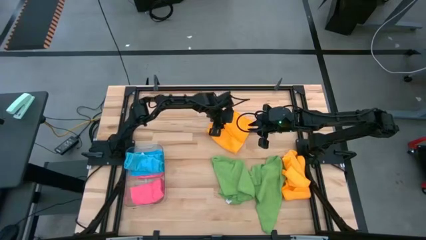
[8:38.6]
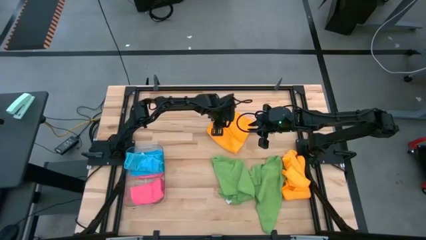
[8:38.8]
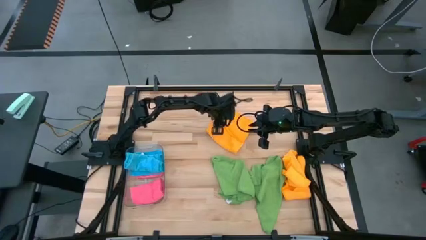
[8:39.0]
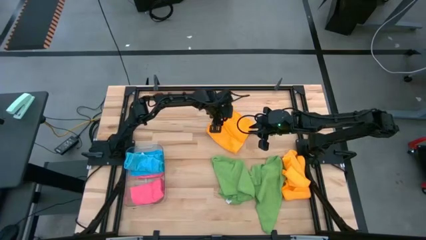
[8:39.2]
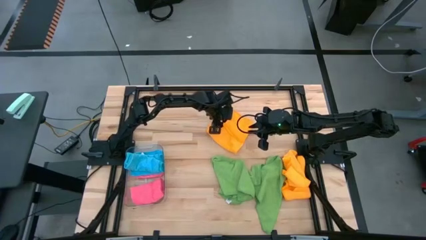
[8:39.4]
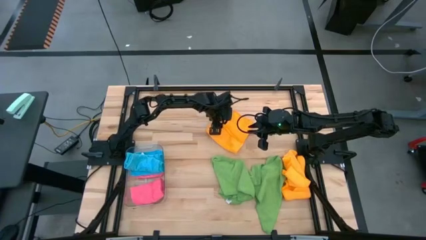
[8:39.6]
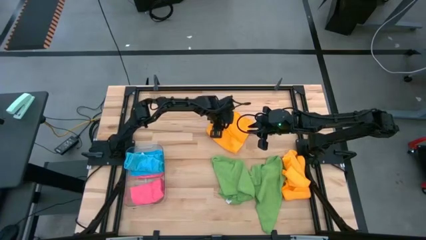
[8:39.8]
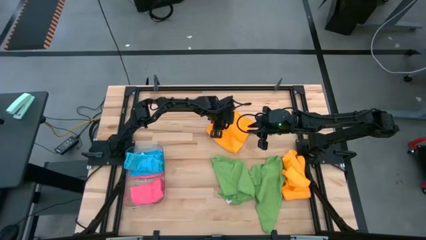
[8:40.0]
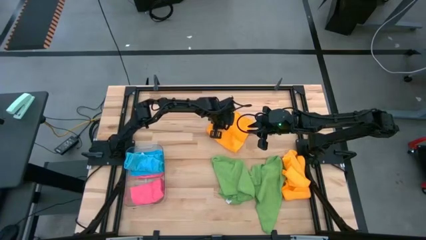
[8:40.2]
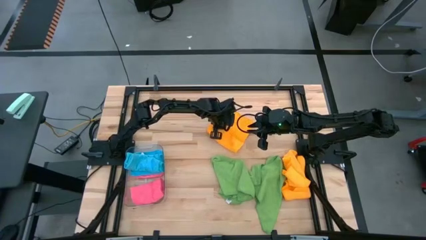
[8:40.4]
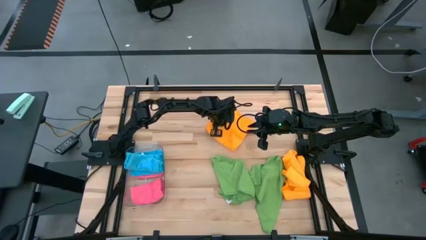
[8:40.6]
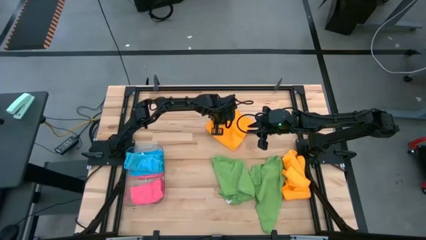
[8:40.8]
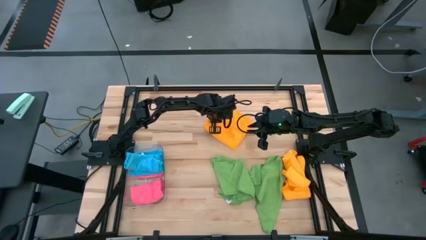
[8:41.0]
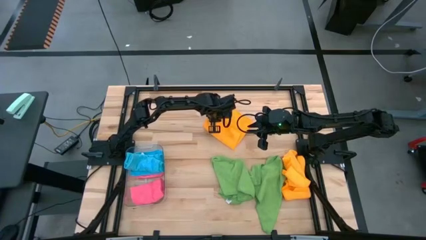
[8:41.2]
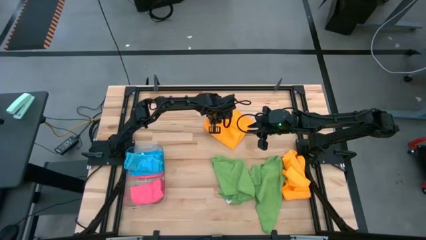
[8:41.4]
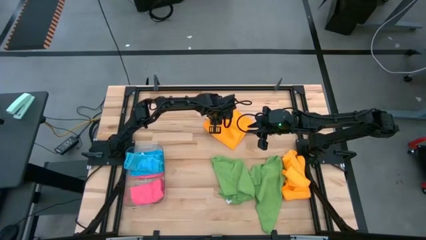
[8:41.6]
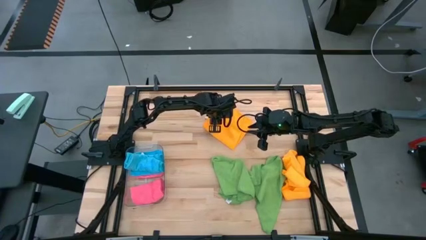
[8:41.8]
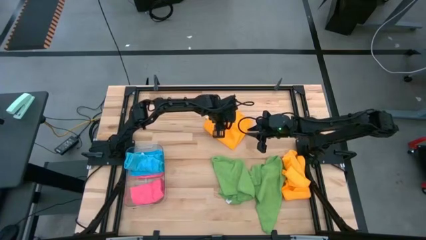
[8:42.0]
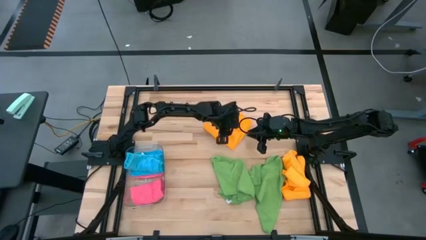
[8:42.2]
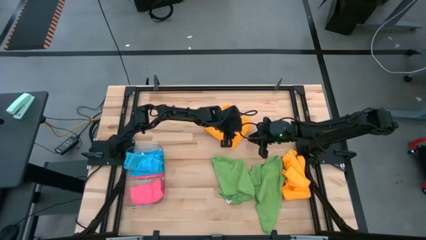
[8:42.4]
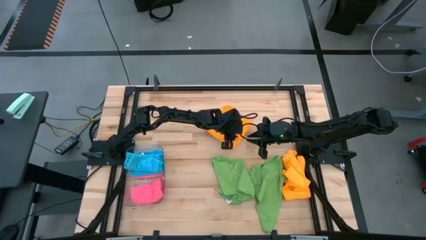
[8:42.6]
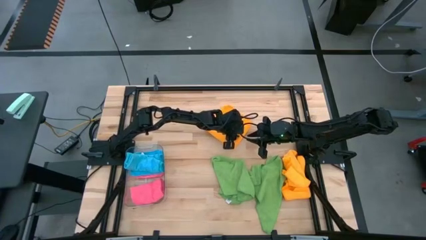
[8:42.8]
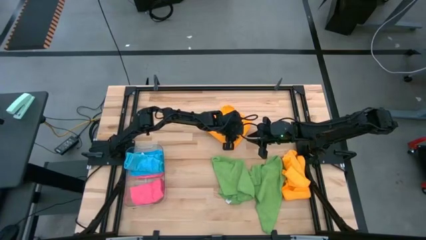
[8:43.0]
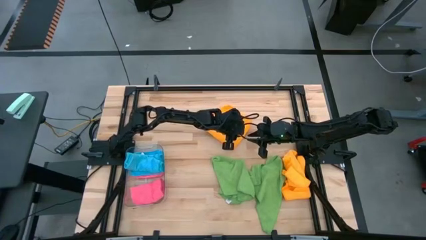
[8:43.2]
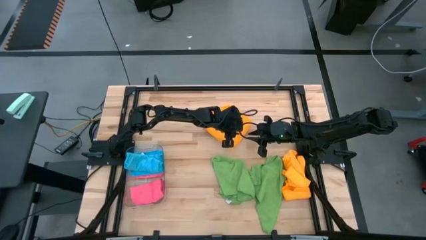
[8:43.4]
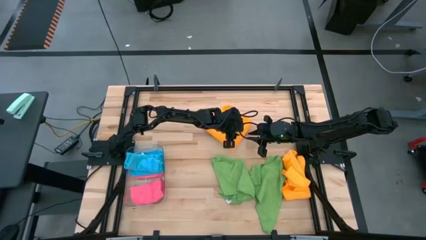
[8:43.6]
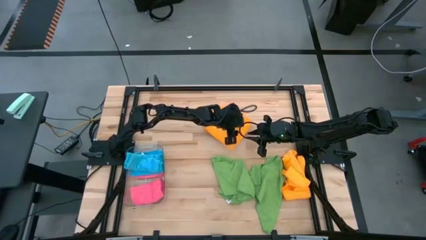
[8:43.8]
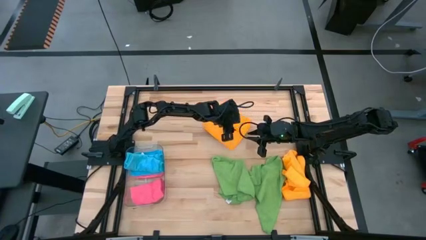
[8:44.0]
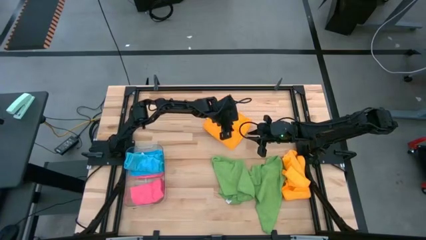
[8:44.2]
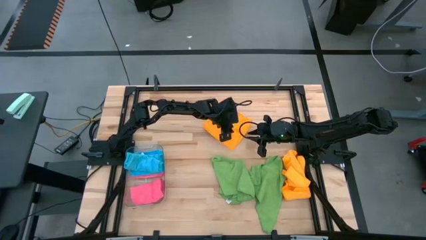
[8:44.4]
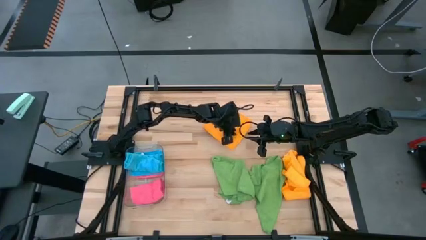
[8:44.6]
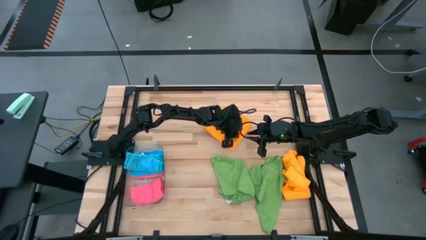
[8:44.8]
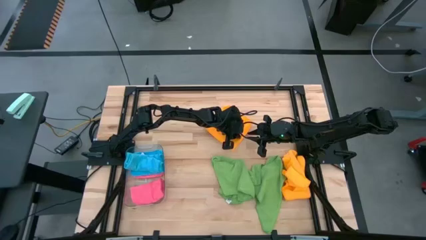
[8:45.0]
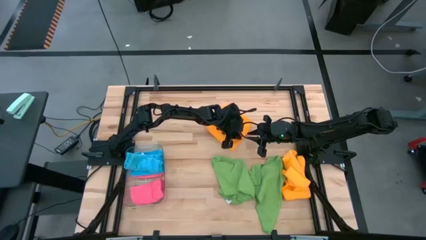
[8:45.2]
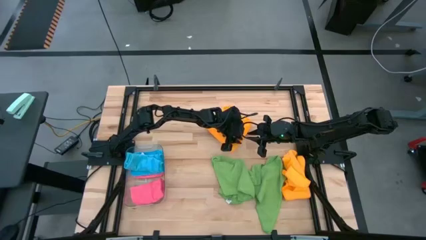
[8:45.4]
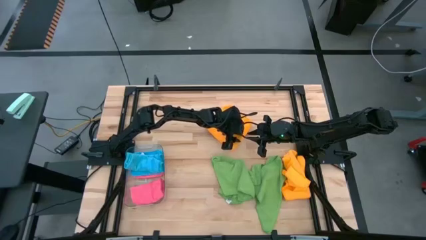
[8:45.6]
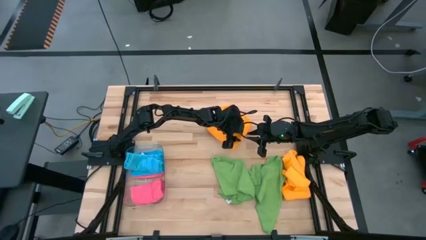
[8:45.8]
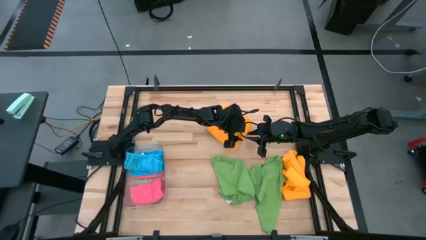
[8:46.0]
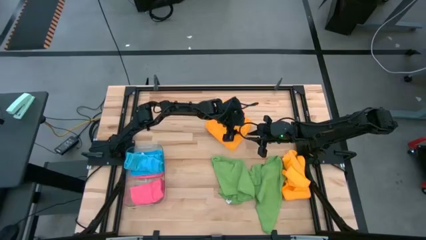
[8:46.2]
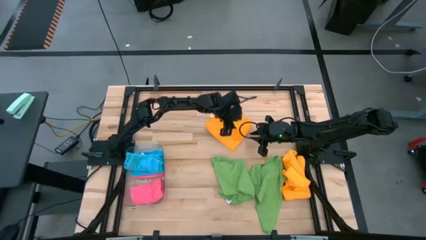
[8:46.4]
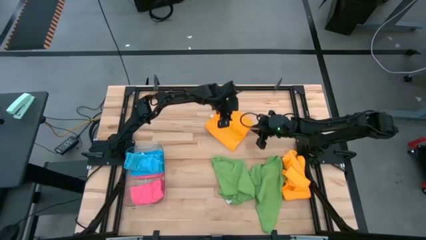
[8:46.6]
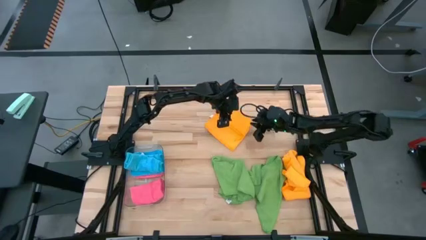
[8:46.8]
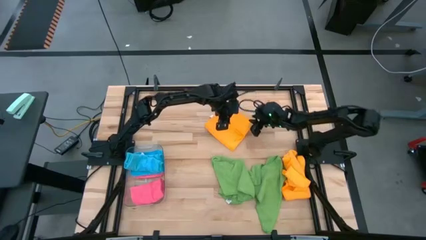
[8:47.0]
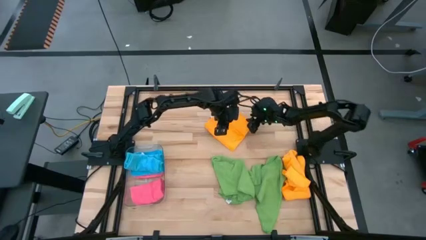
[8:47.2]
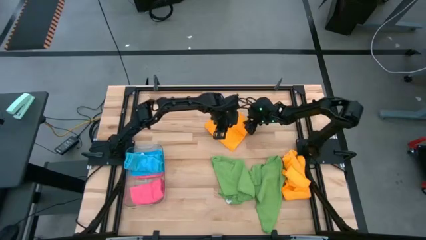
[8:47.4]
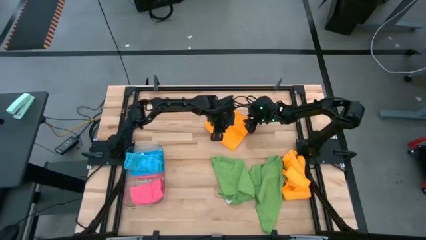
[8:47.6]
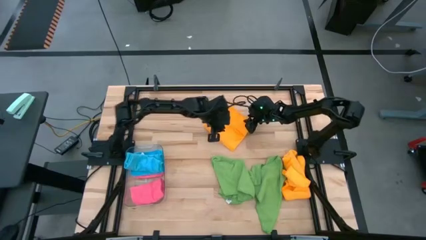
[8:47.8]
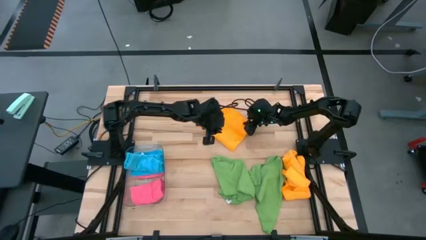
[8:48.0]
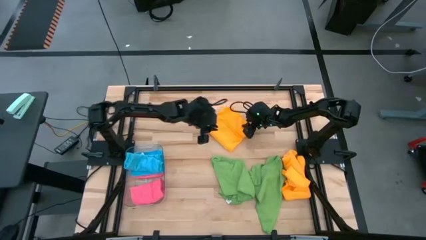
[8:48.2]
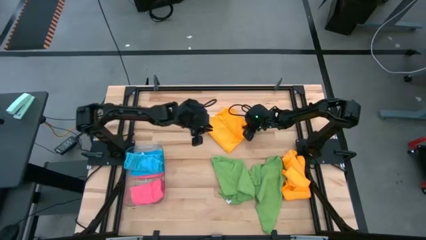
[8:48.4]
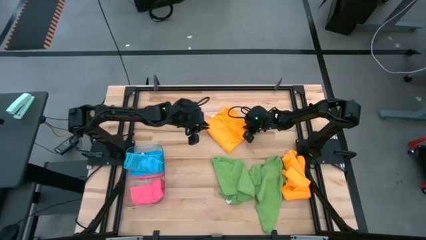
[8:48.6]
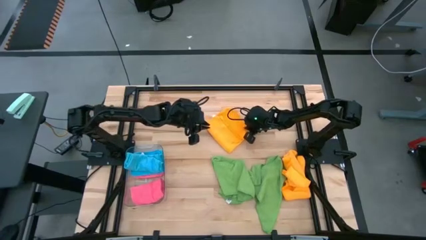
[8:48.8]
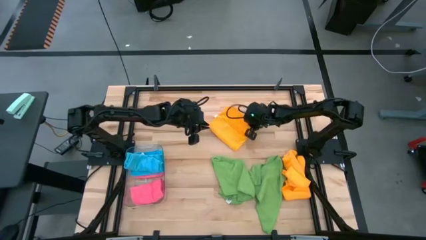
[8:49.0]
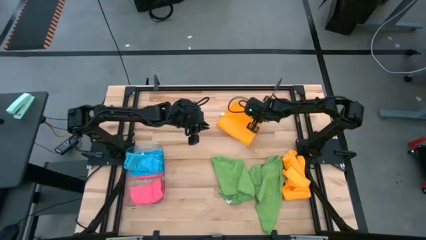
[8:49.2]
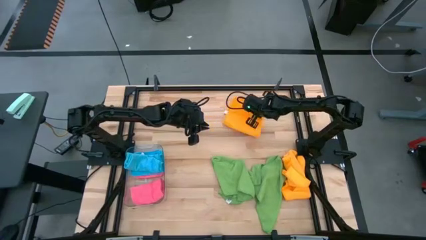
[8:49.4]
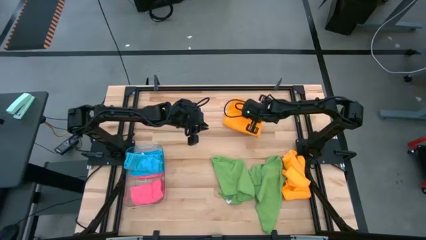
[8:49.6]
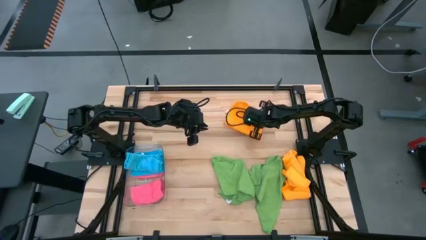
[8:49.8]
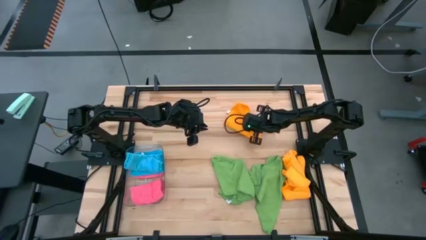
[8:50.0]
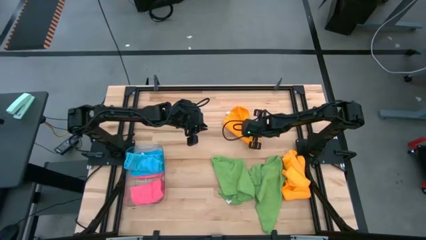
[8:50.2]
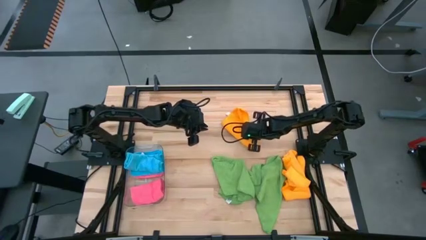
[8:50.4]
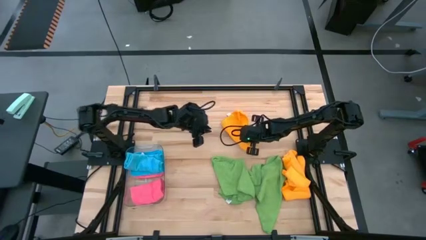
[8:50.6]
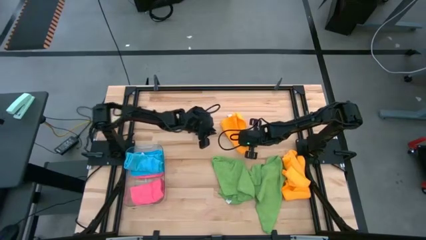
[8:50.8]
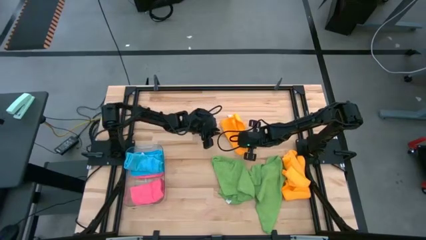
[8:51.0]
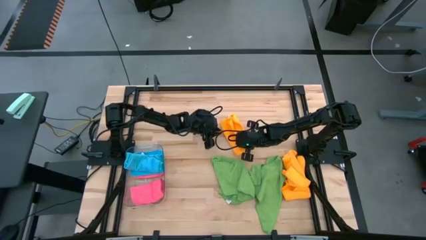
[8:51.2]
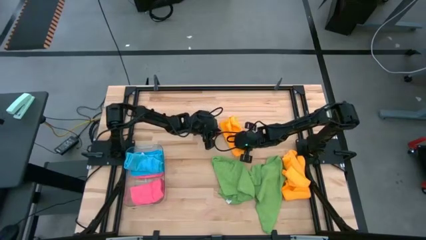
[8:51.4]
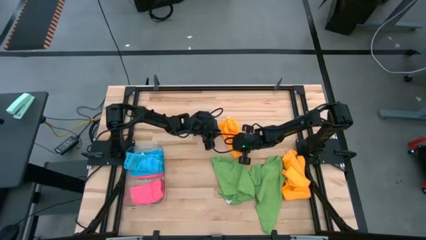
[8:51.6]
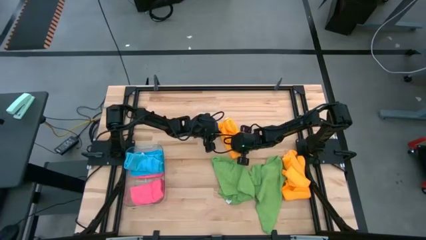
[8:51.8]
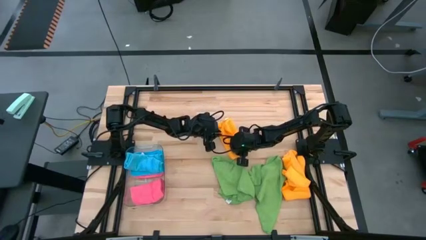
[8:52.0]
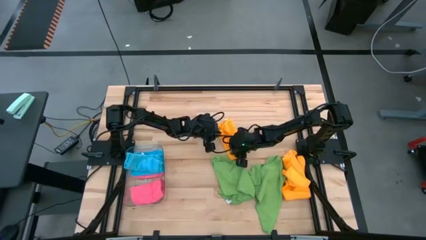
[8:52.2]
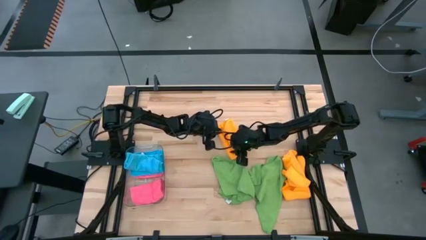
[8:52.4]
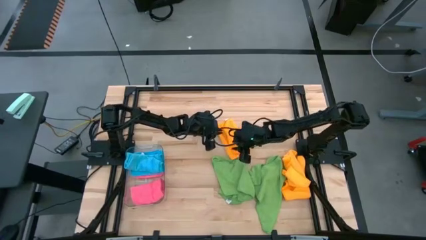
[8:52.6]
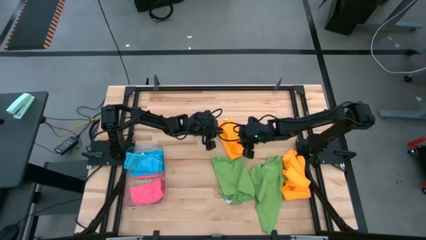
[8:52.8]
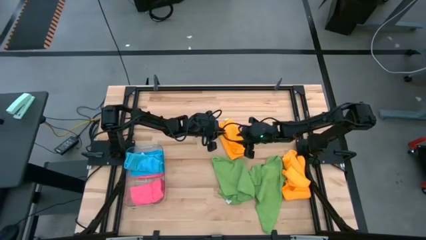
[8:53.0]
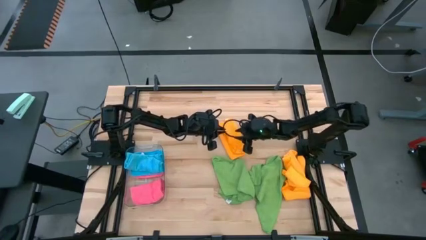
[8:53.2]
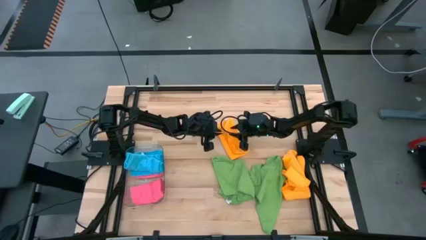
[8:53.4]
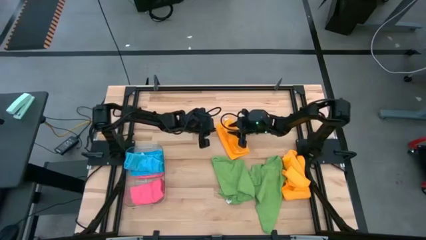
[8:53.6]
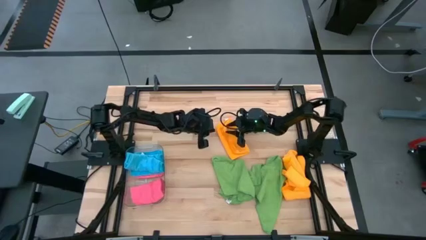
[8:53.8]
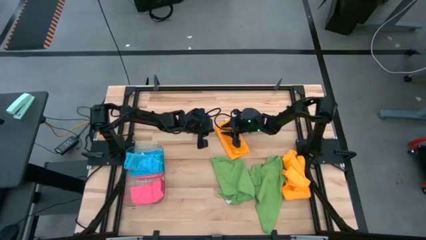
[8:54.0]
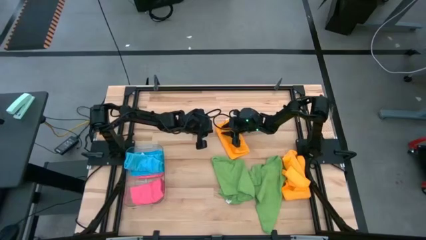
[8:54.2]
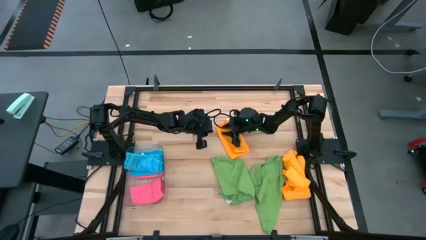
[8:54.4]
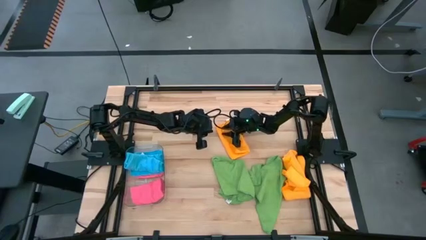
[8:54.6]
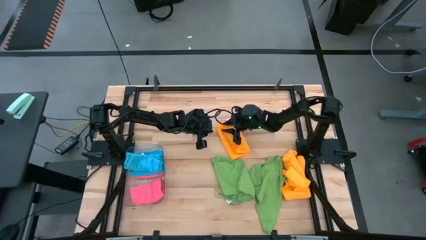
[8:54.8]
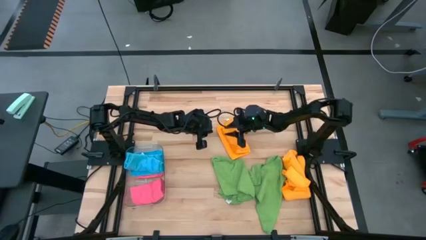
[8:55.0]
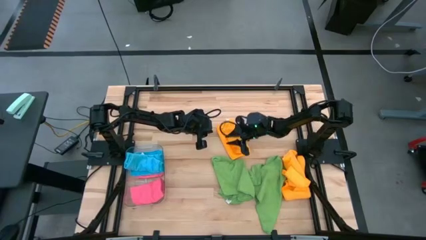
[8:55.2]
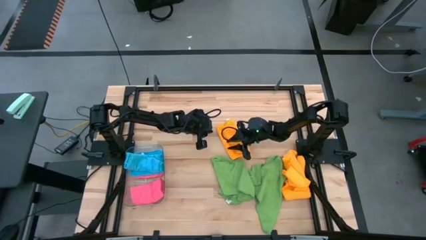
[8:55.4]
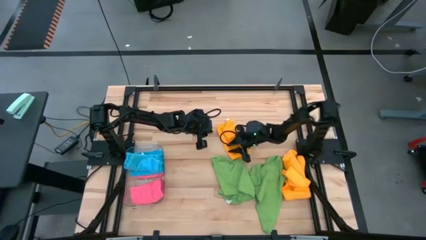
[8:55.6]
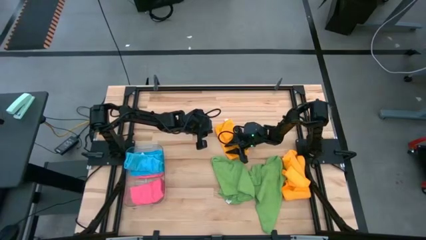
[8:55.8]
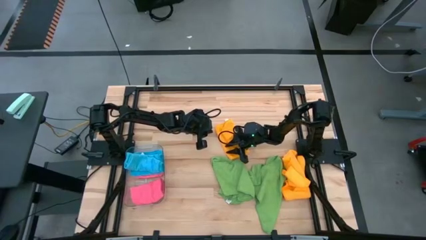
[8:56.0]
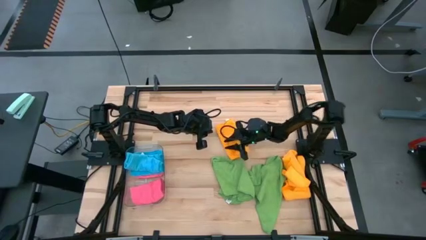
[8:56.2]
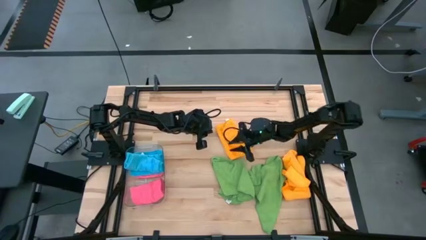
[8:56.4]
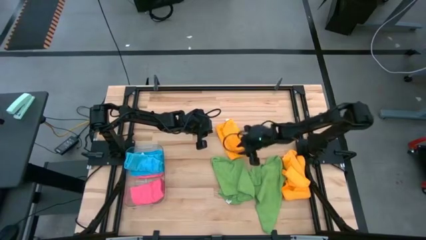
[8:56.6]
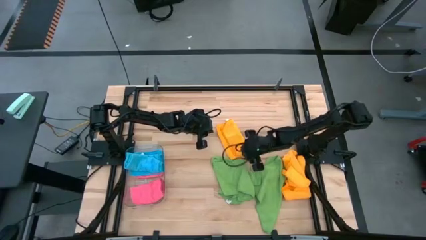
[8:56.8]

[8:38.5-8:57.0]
Task: Fold microfiber towels
Fold the left yellow microfiber cloth
